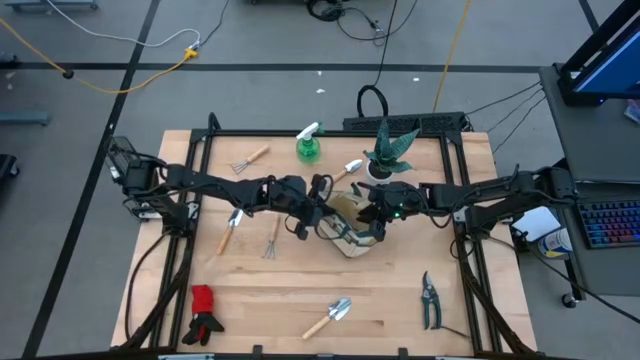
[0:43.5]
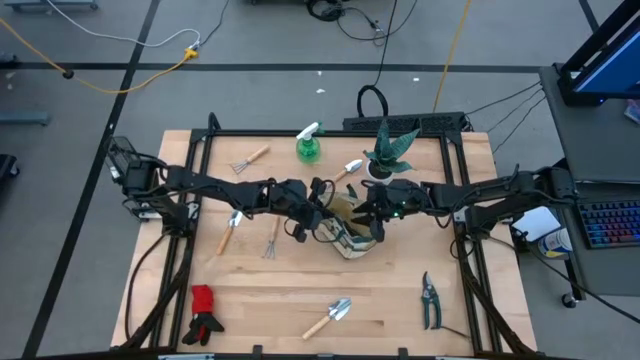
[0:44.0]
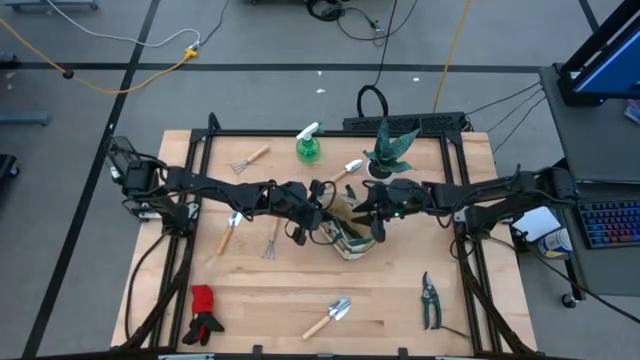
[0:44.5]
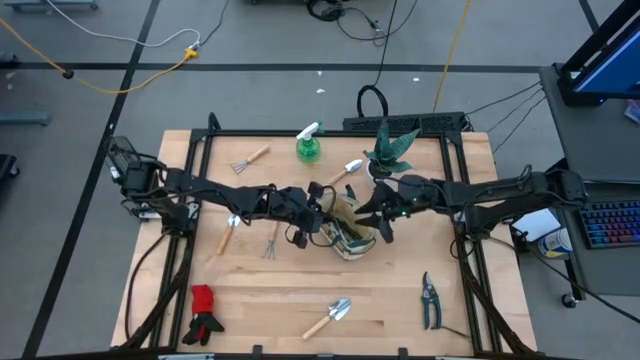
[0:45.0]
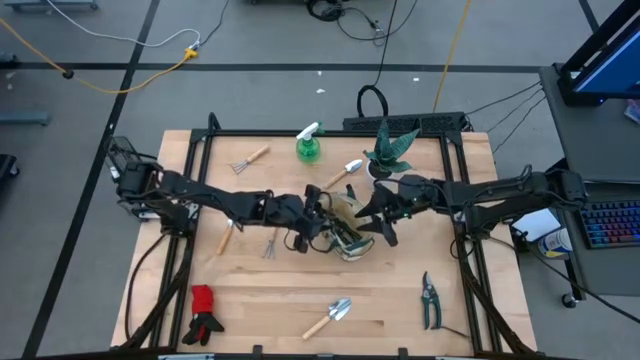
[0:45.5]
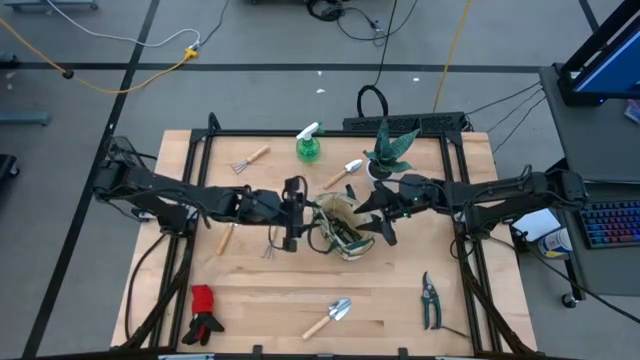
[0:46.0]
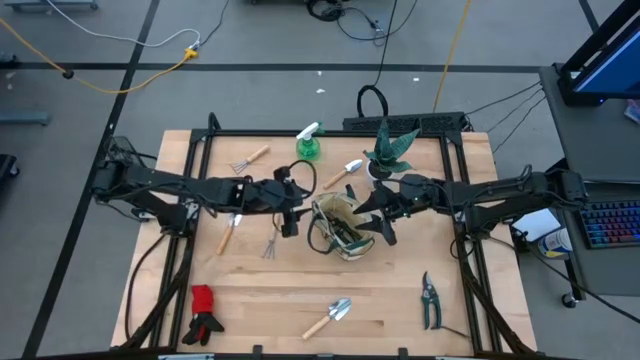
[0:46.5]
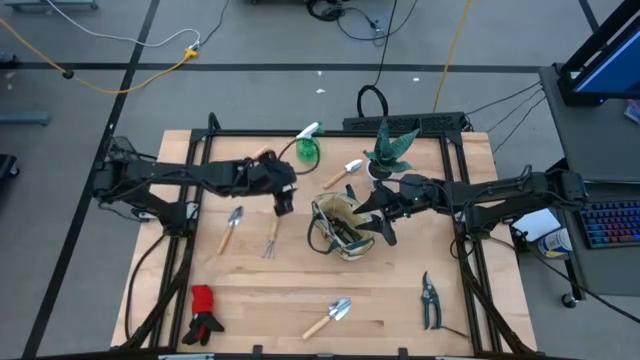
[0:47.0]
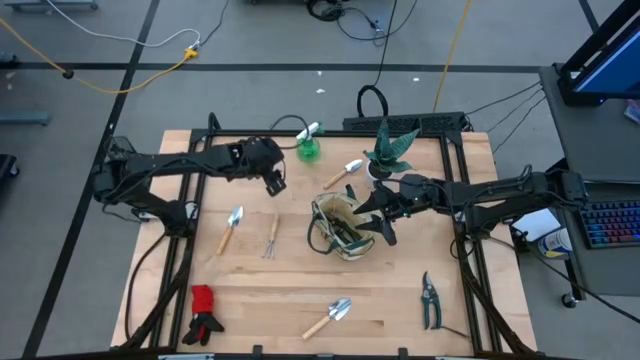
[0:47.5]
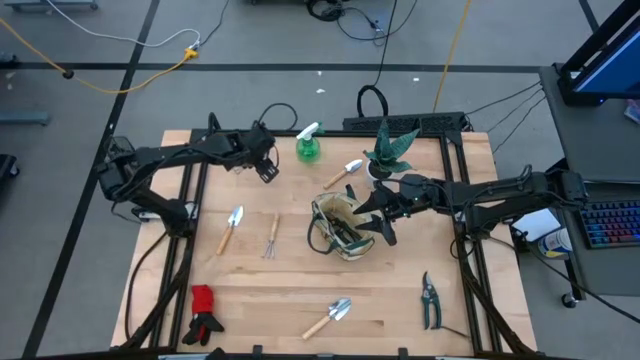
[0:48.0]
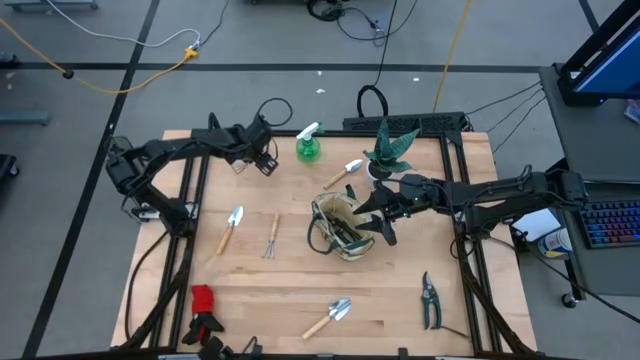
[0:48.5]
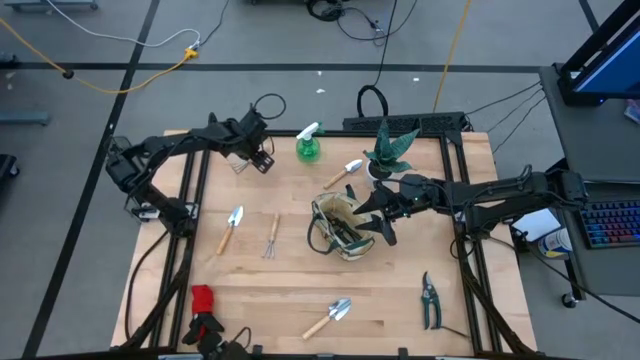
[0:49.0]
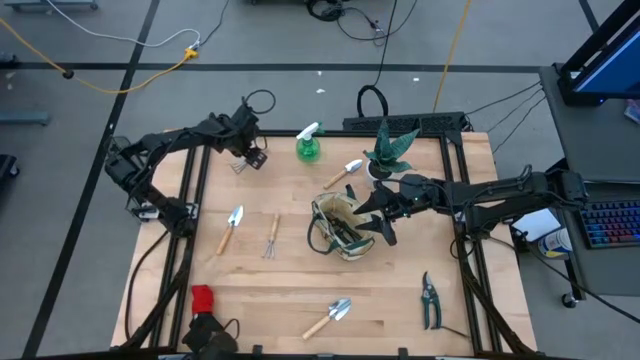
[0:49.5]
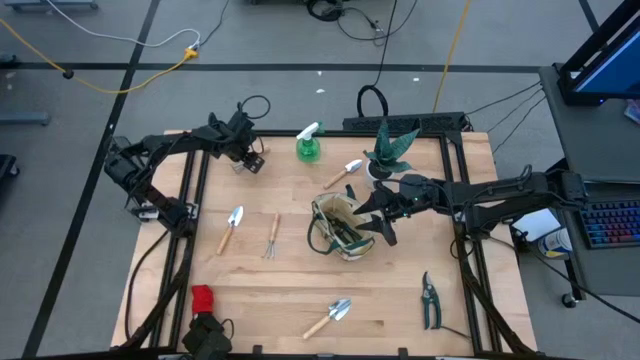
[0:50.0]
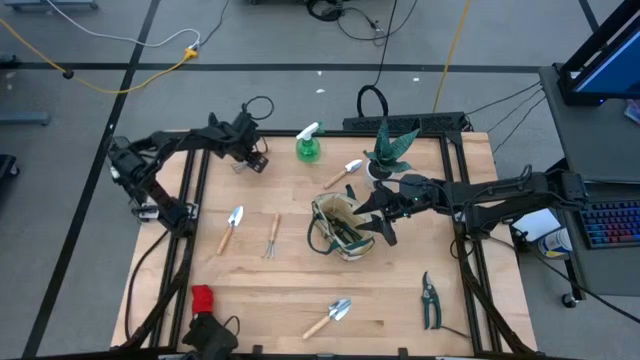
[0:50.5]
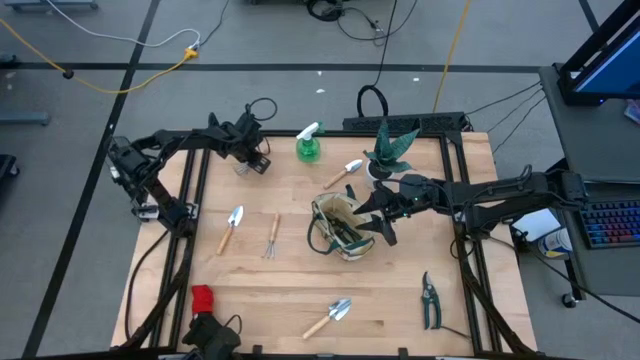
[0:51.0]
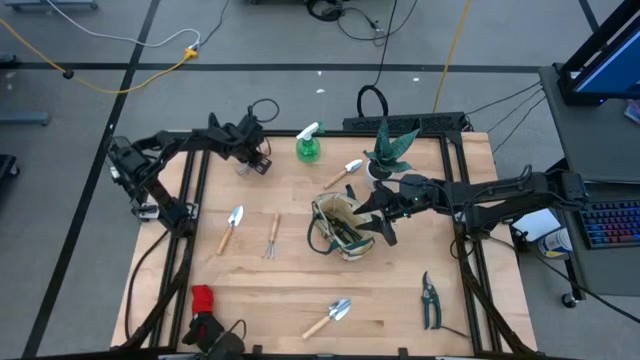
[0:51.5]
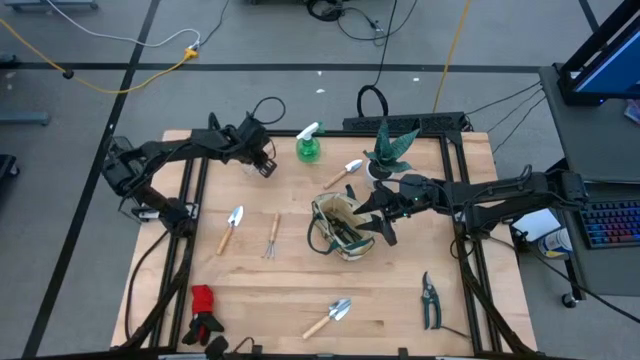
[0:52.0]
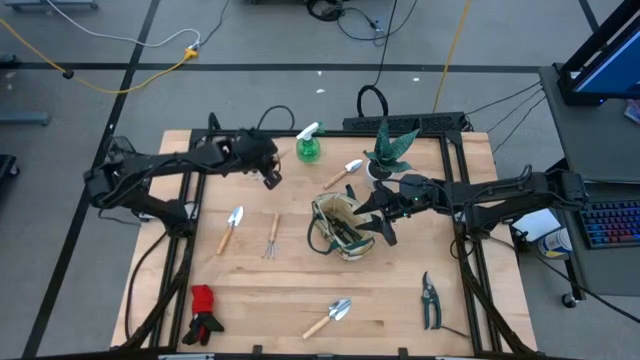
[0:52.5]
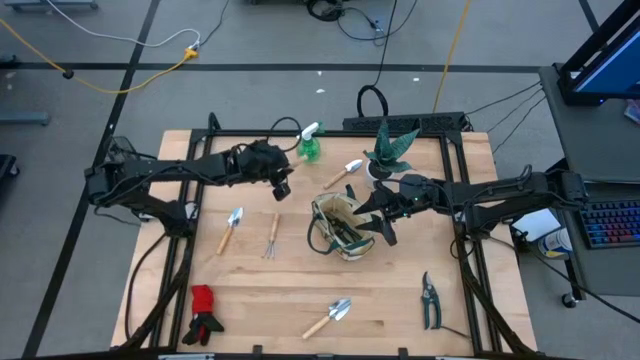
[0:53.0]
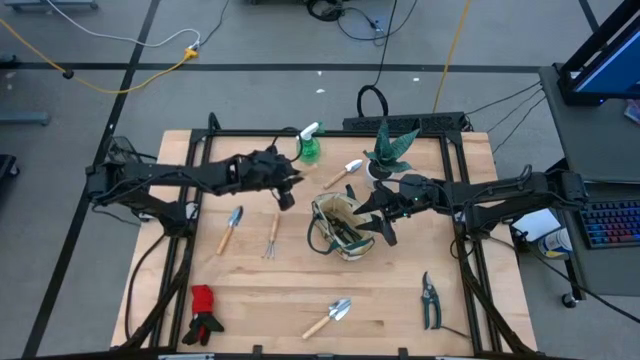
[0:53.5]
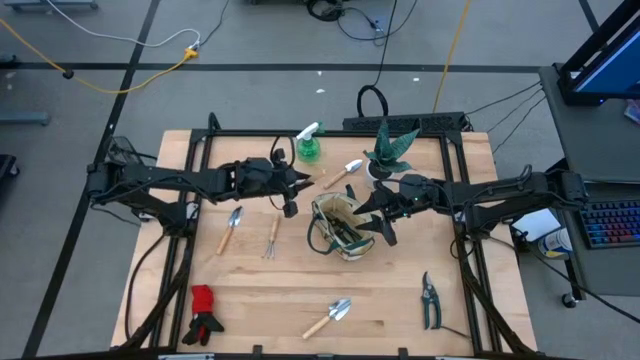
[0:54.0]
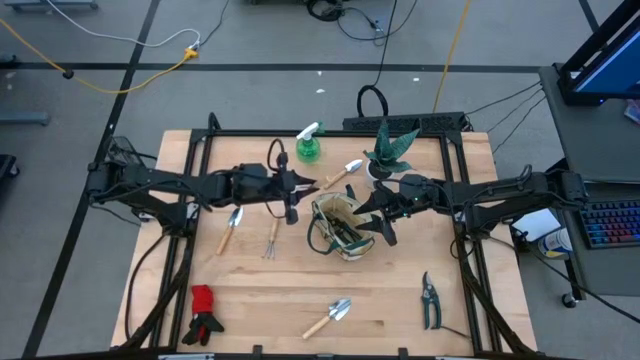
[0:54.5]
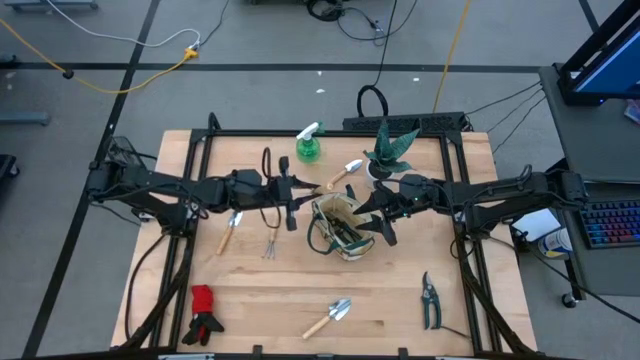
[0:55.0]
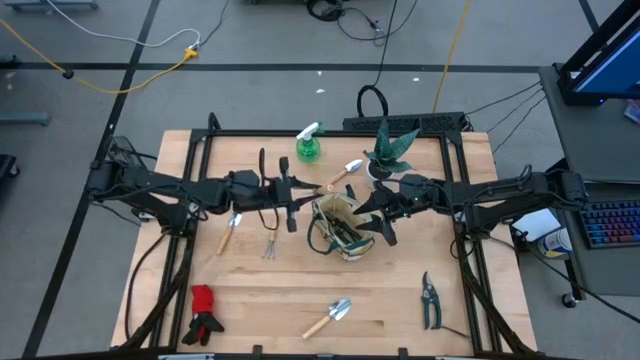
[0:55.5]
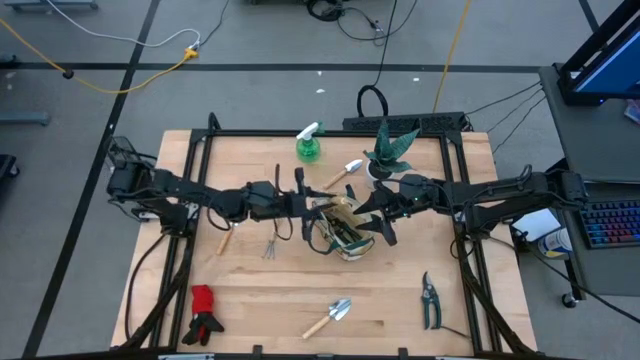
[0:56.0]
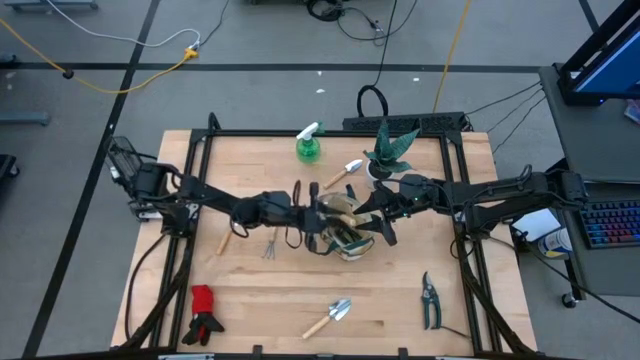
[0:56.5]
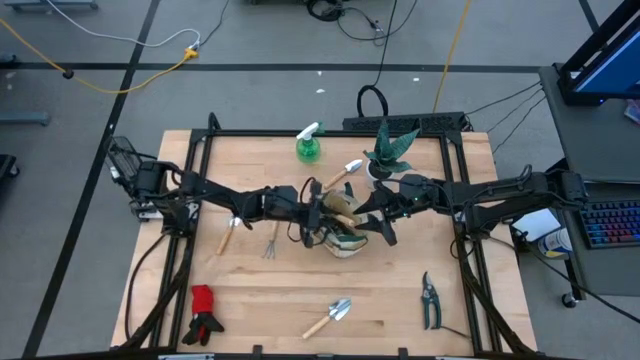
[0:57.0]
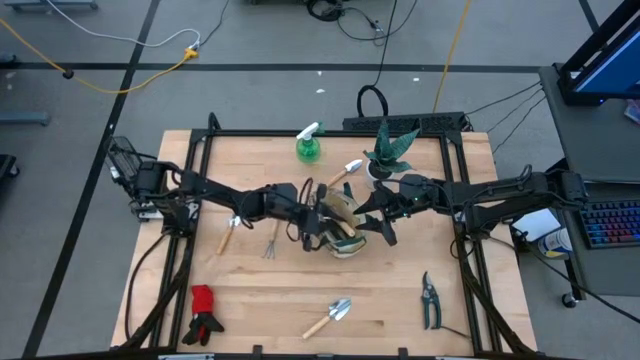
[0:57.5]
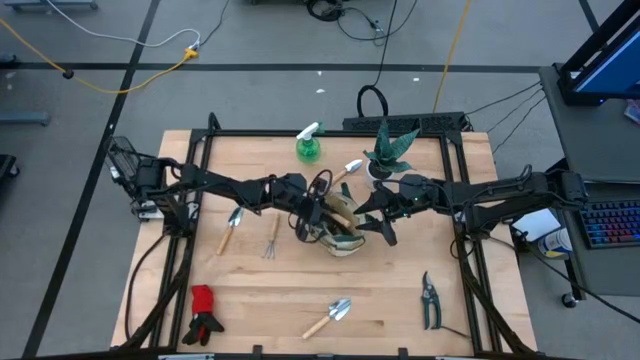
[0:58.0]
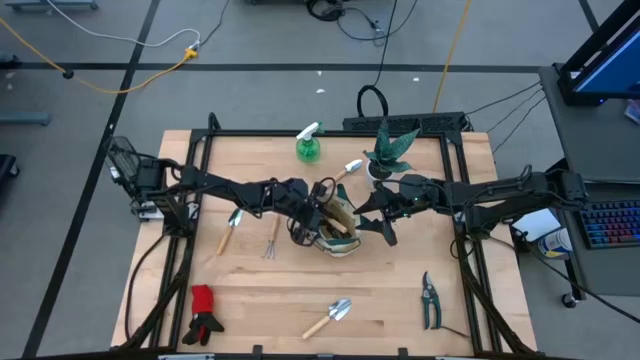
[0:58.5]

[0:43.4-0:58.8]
Task: Pick & Place Garden tools in Gardening bag
Put the top brown hand rake into the gardening bag

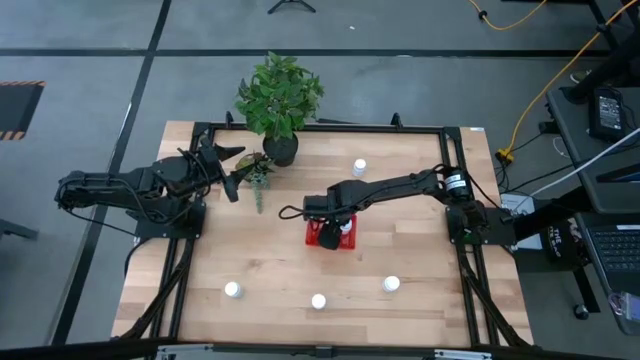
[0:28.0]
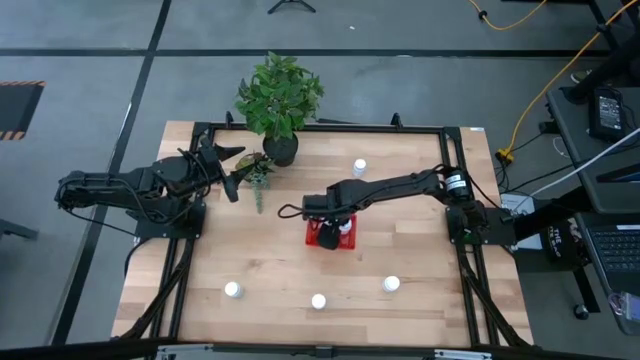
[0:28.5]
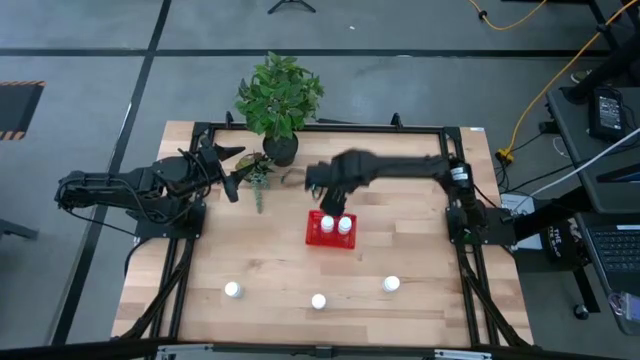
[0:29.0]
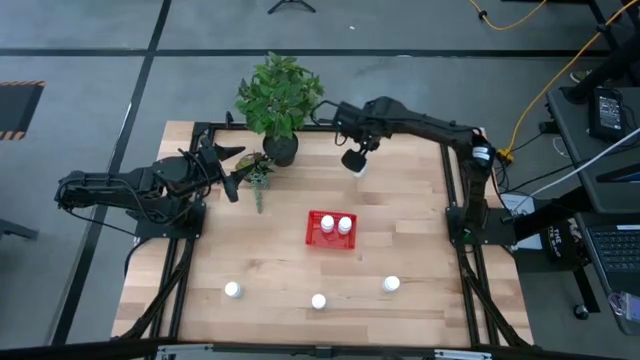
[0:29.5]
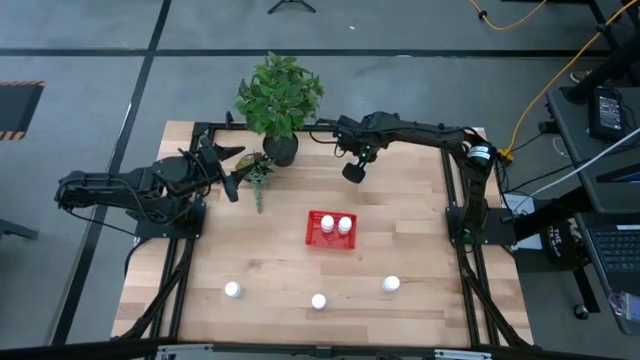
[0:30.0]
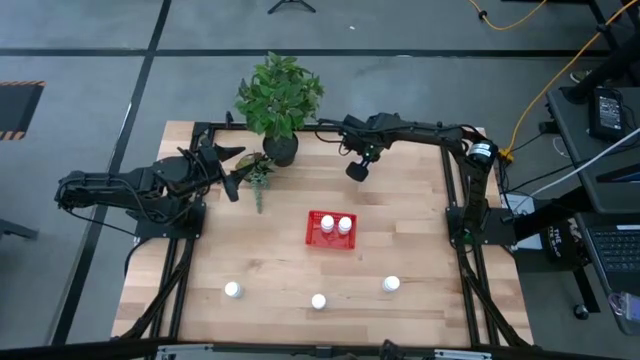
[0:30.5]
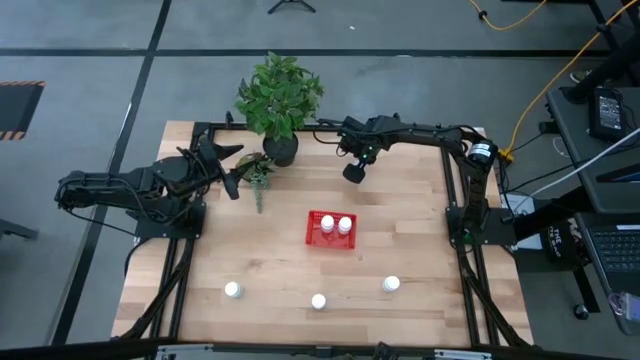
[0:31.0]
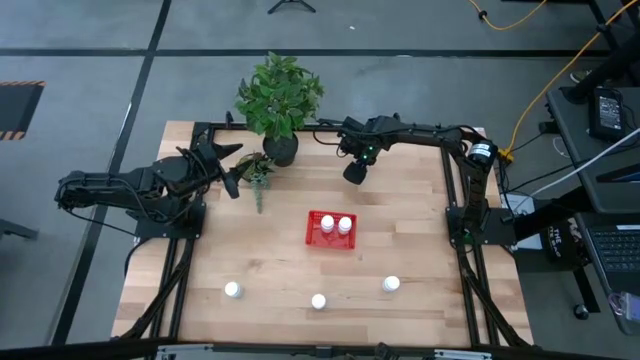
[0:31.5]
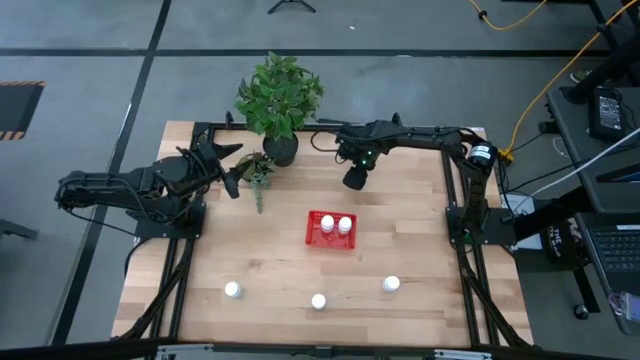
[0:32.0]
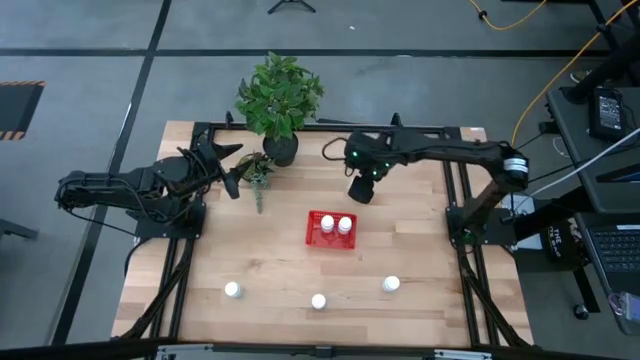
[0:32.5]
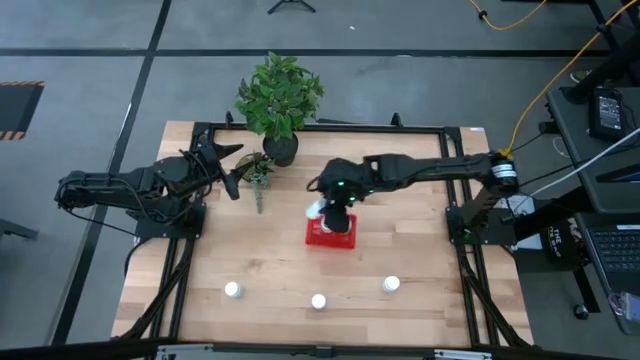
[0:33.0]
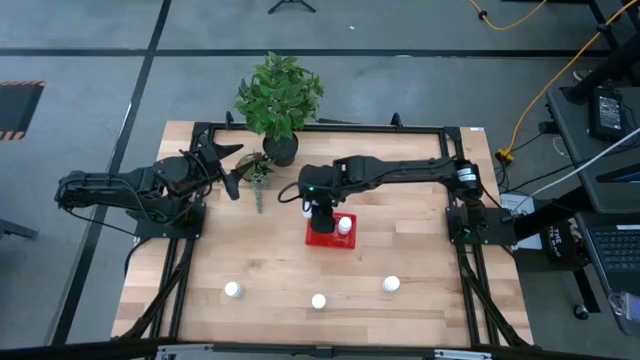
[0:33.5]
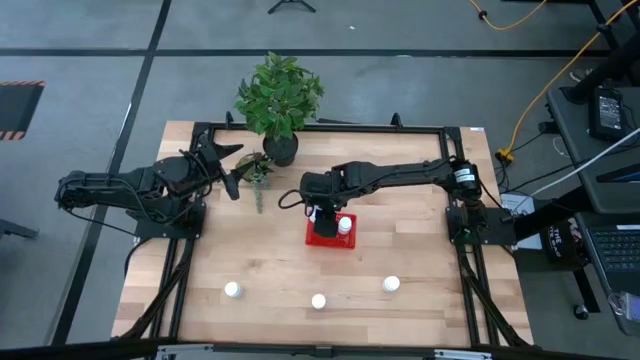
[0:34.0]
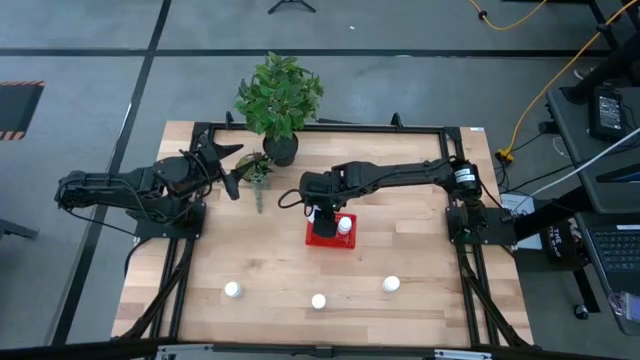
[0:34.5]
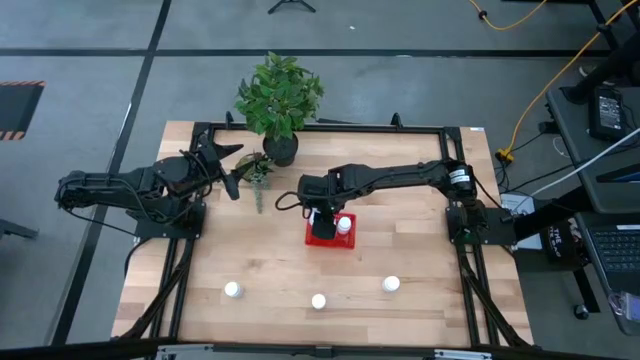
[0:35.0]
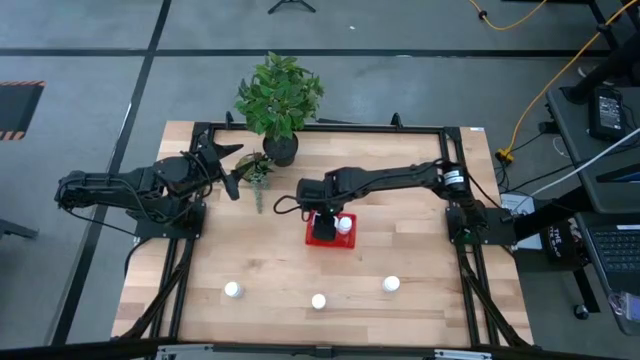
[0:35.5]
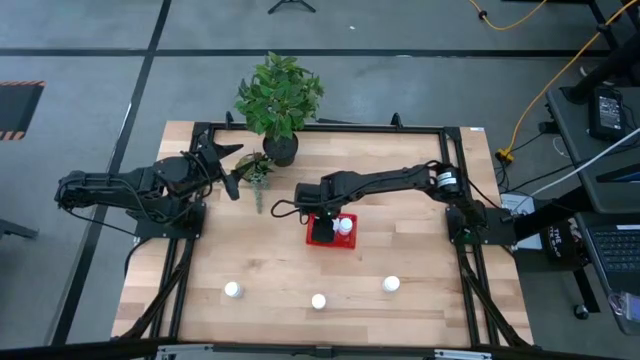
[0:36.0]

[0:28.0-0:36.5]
Task: Pick and place pill bottles into a basket
Put the white medicine bottle into the red basket
